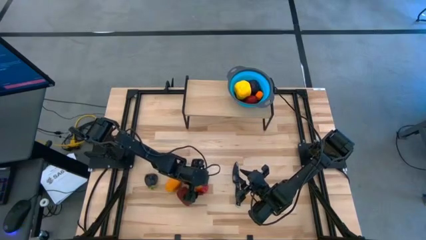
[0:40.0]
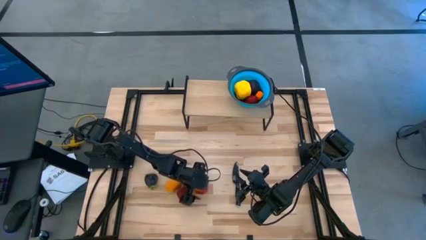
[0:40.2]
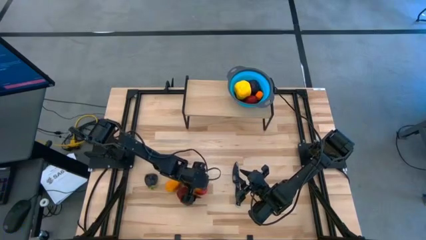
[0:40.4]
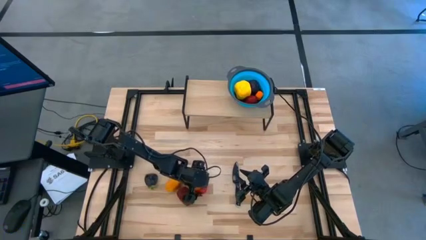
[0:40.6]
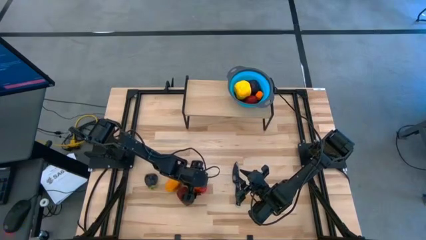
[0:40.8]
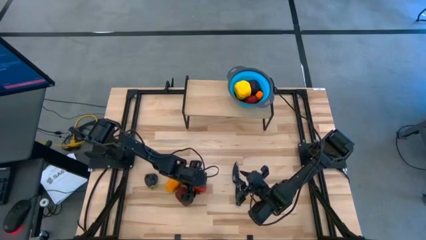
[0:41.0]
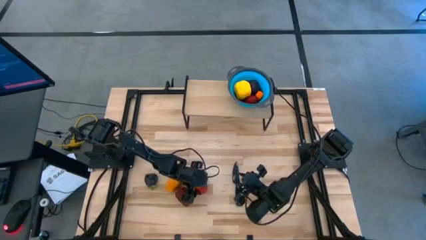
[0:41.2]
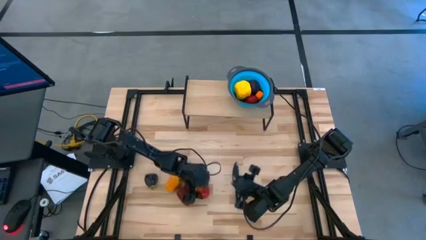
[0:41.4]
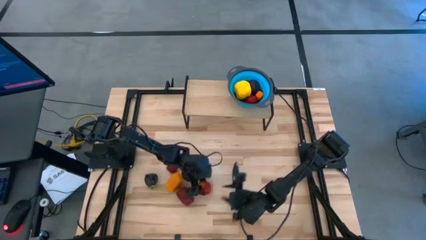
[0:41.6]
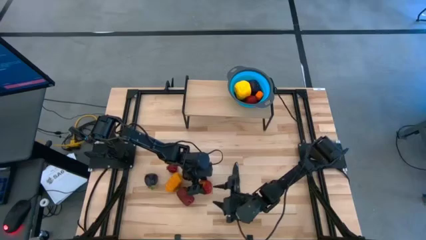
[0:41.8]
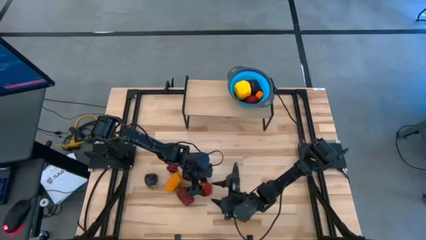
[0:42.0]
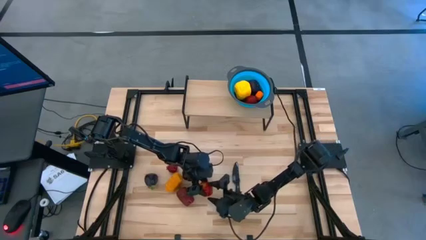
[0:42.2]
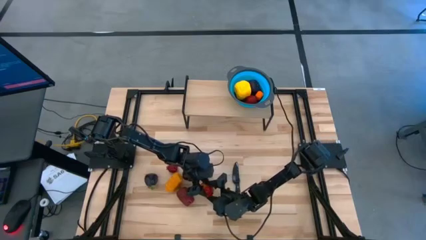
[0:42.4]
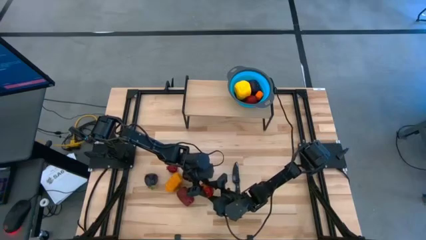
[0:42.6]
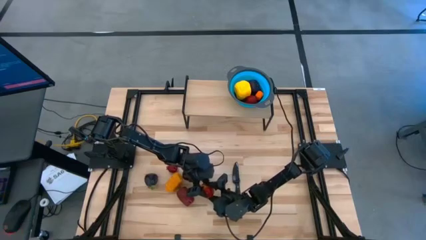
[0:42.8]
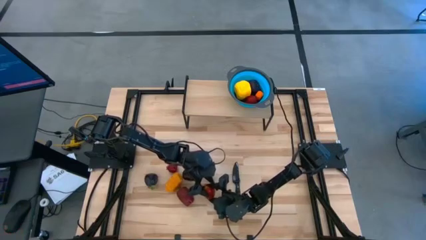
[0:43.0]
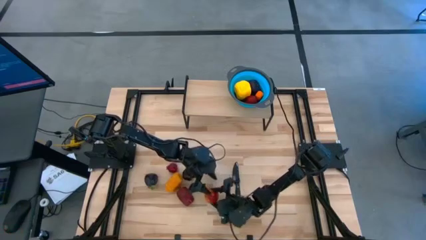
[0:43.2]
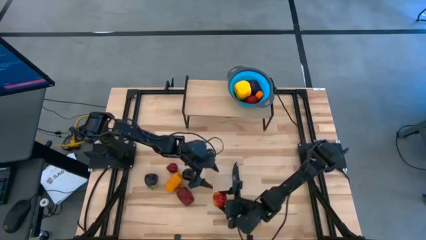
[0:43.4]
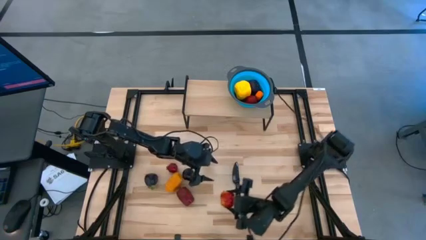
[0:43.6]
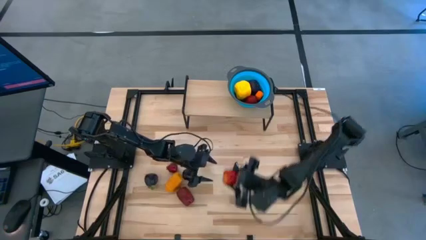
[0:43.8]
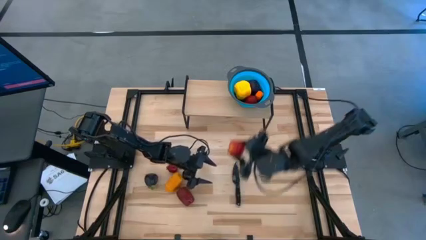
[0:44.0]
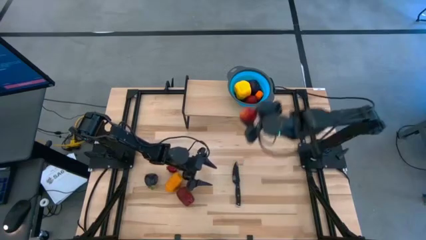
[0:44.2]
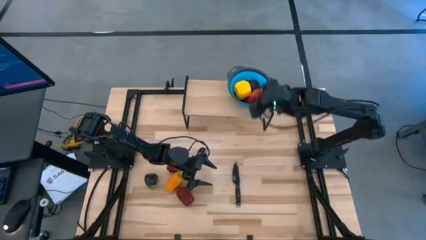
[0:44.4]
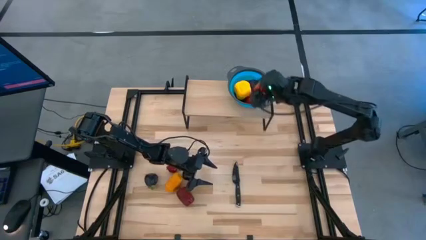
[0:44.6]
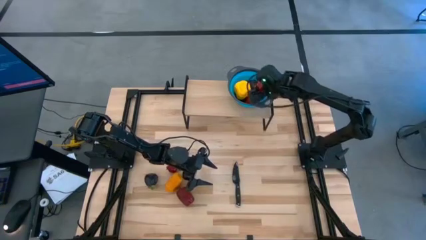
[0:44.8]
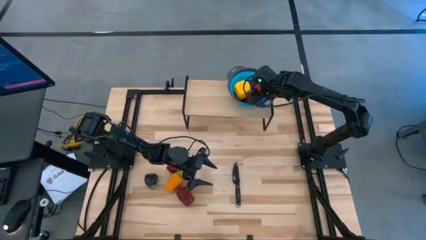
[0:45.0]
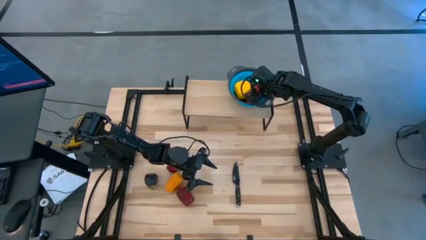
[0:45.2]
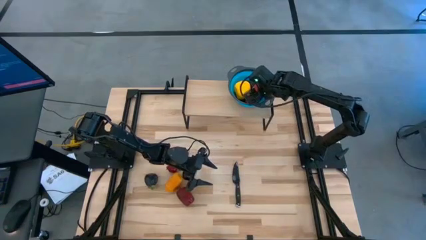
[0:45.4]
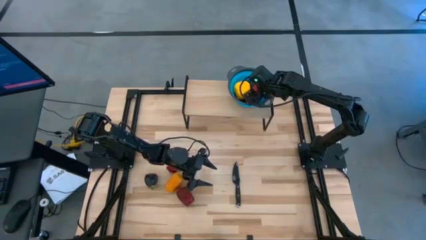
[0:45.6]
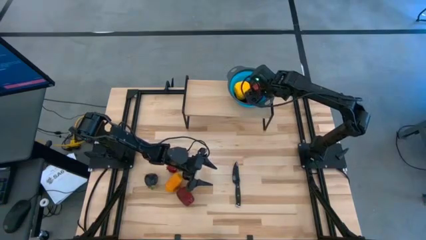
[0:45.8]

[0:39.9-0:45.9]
Task: Pick & Place Fruit
Put the right red apple into the blue strainer bowl on the shelf

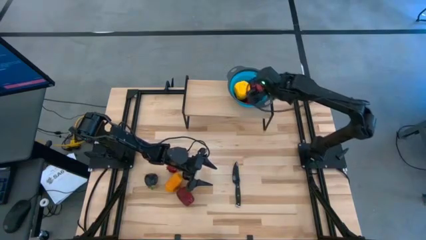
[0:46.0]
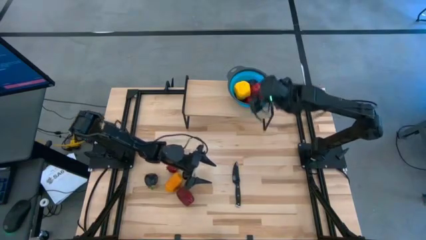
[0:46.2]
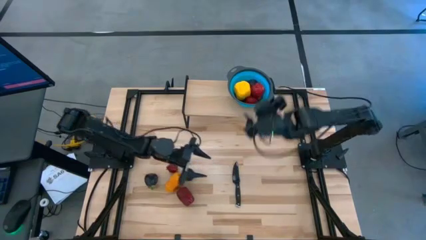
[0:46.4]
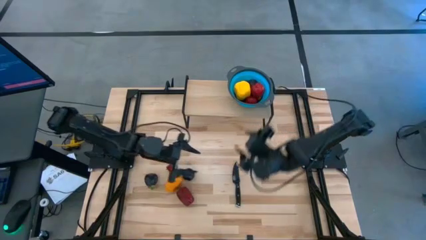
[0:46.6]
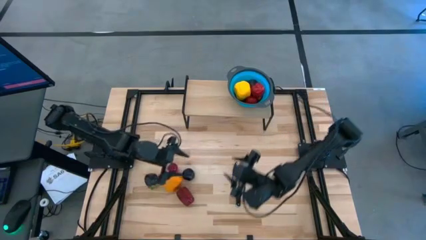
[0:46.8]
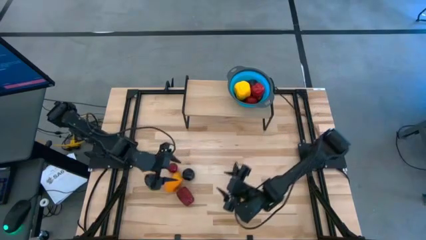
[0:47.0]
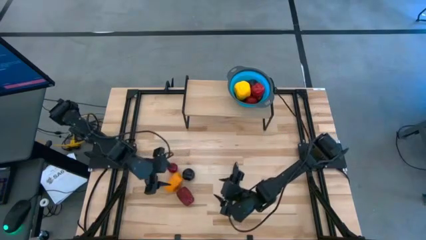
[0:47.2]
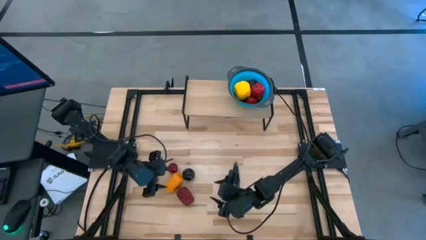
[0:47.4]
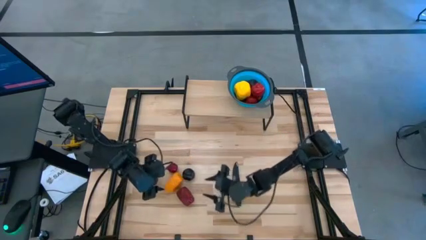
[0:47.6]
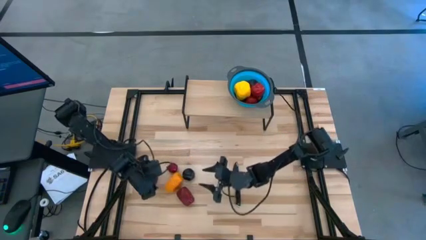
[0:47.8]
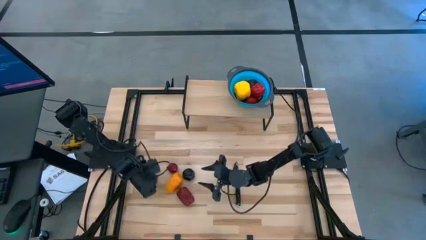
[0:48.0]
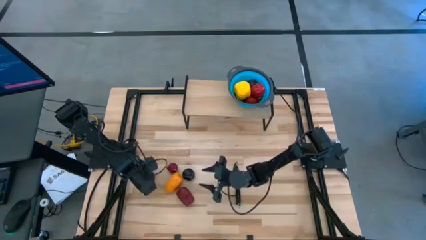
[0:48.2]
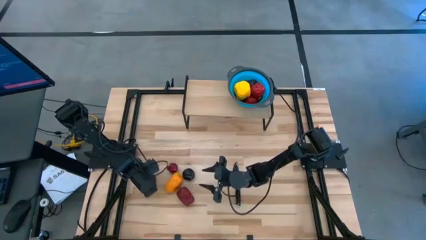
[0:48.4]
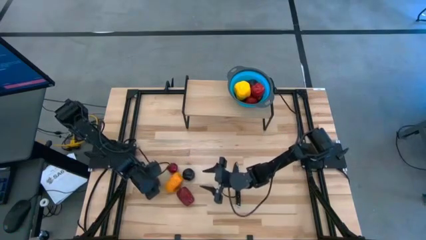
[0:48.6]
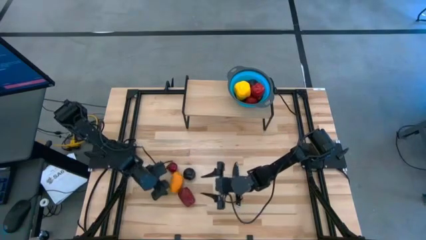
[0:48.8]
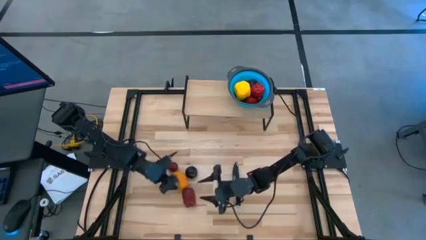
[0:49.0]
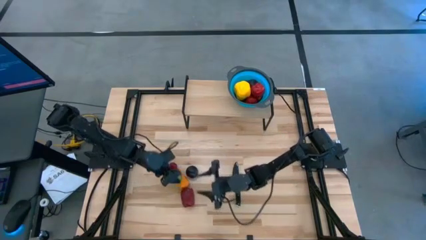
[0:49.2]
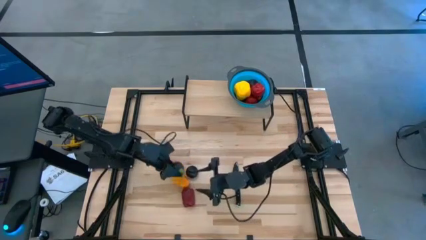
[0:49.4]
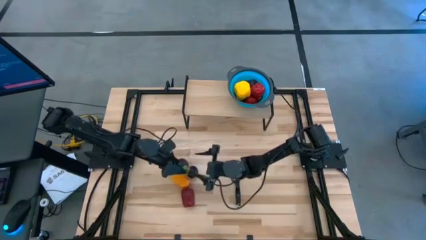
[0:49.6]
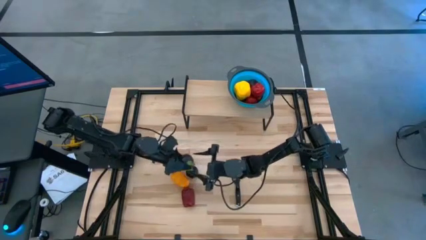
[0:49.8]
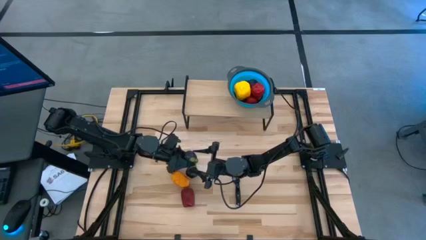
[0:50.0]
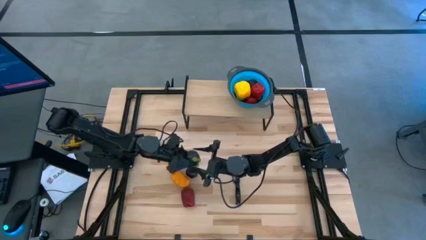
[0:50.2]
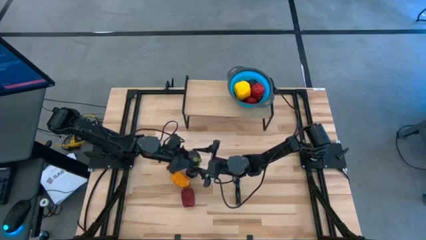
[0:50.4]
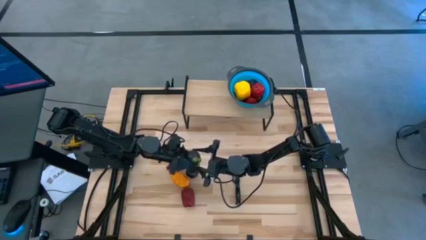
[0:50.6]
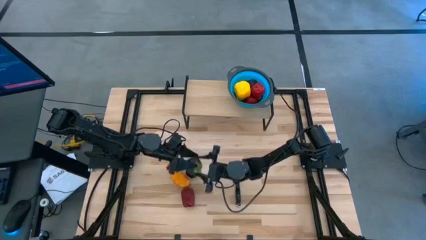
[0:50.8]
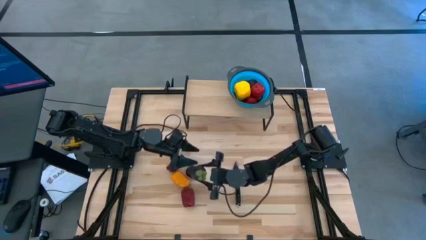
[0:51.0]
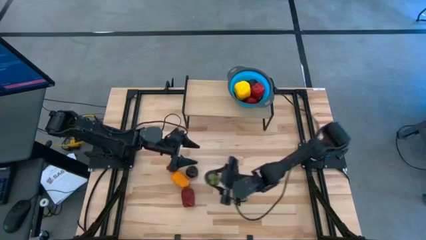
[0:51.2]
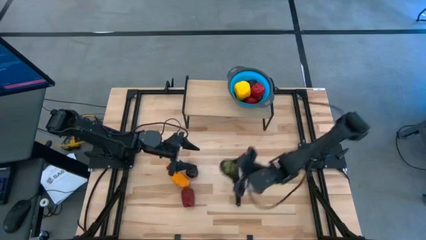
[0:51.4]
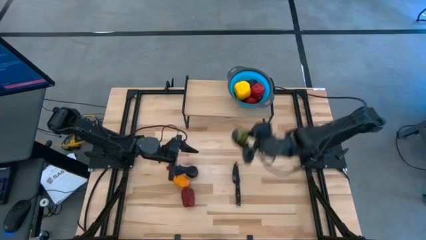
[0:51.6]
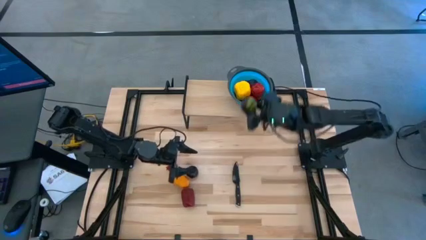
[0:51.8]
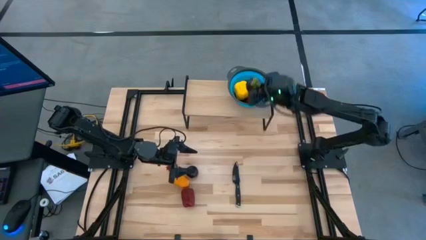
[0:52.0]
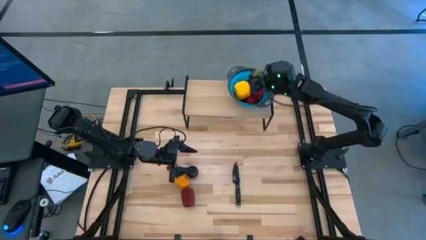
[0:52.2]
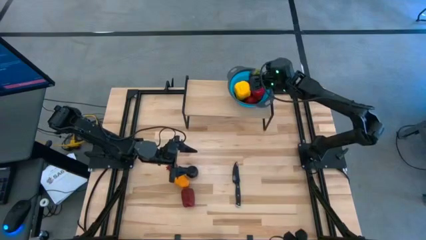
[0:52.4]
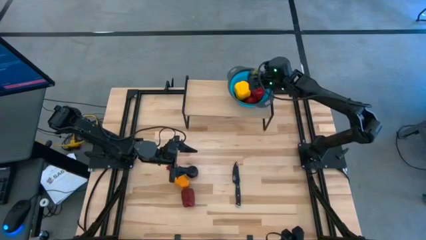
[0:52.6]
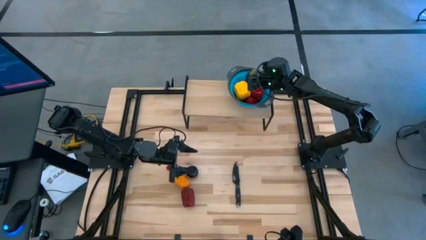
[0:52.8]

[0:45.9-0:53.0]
Put the purple mangosteen into the blue strainer bowl on the shelf

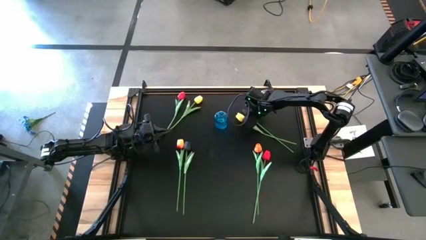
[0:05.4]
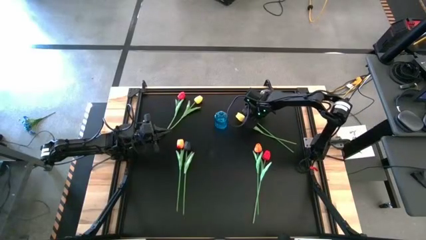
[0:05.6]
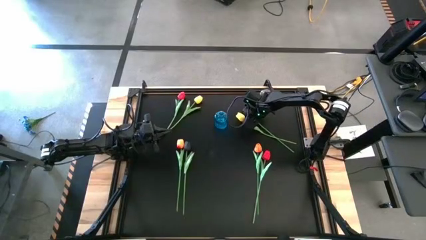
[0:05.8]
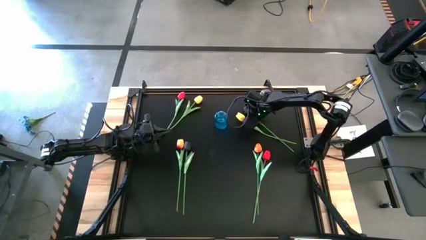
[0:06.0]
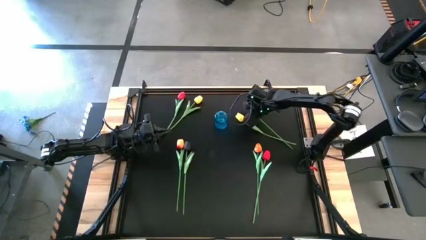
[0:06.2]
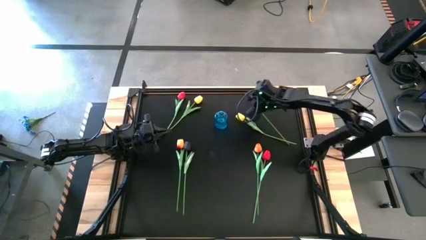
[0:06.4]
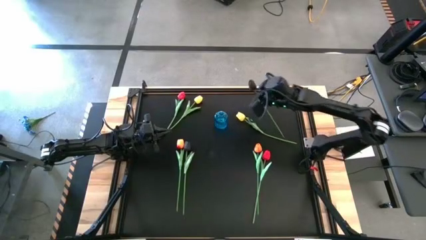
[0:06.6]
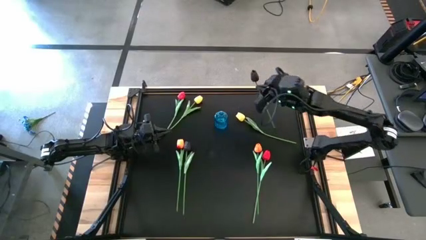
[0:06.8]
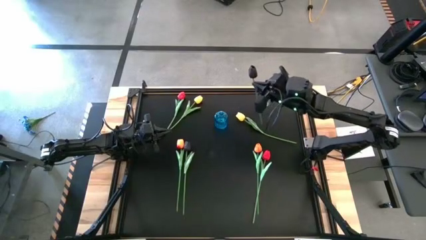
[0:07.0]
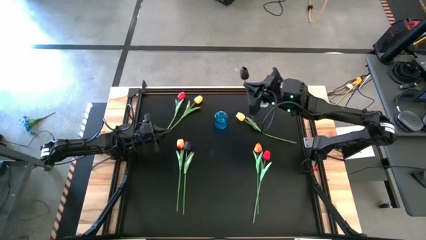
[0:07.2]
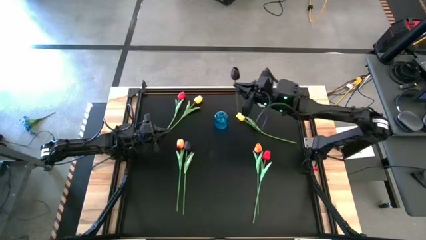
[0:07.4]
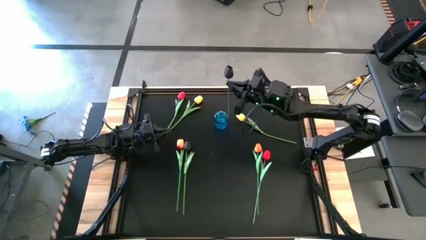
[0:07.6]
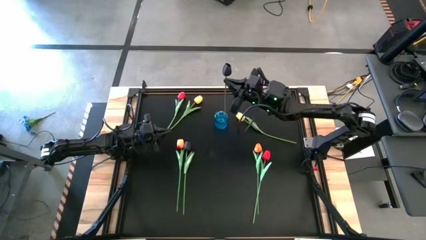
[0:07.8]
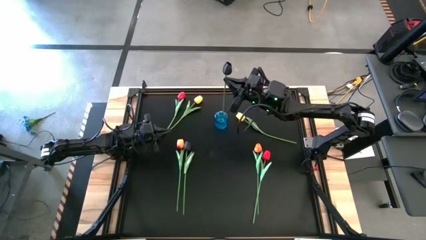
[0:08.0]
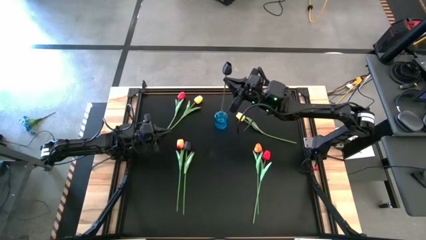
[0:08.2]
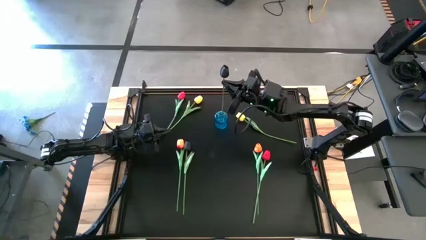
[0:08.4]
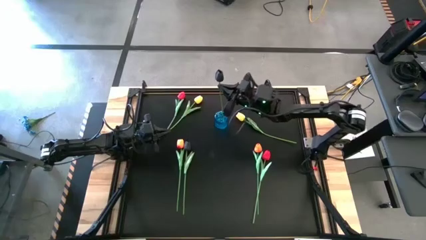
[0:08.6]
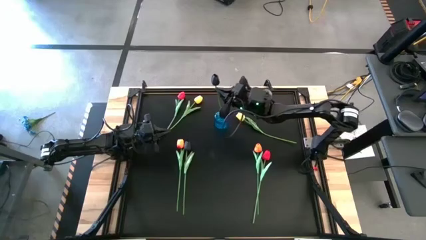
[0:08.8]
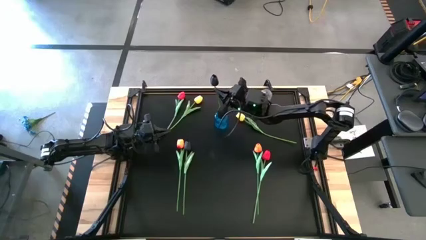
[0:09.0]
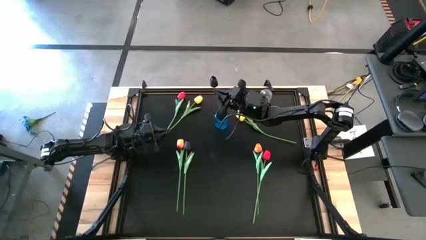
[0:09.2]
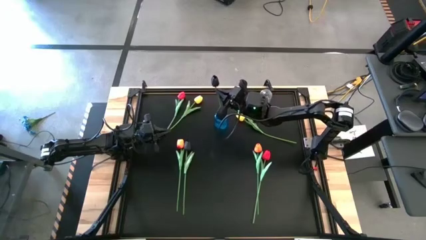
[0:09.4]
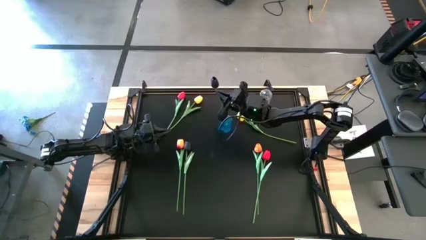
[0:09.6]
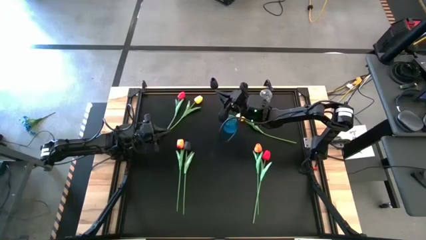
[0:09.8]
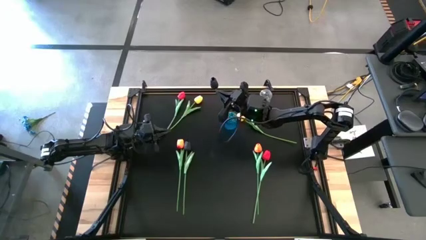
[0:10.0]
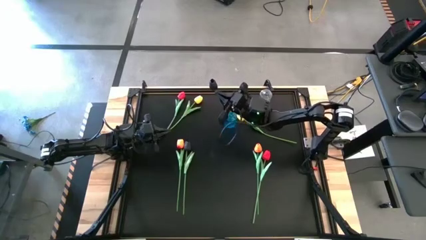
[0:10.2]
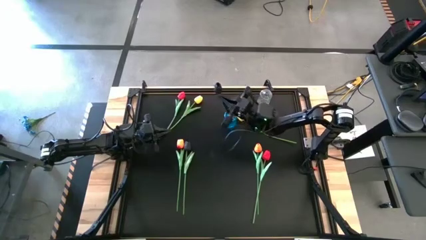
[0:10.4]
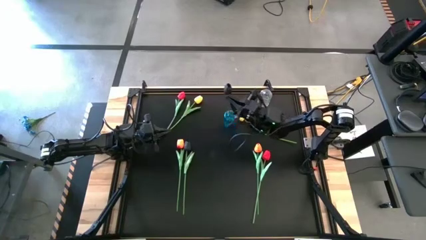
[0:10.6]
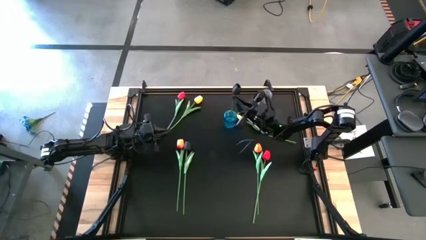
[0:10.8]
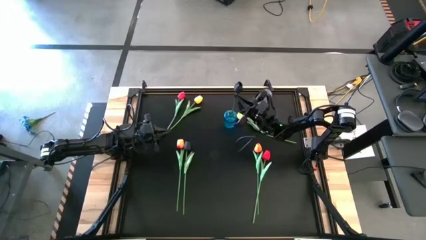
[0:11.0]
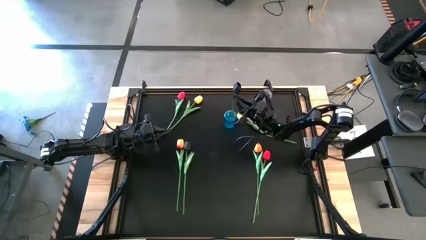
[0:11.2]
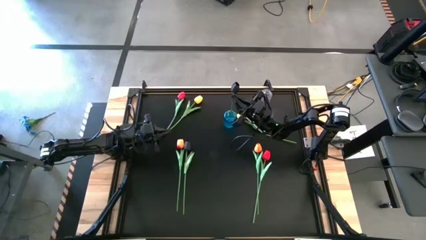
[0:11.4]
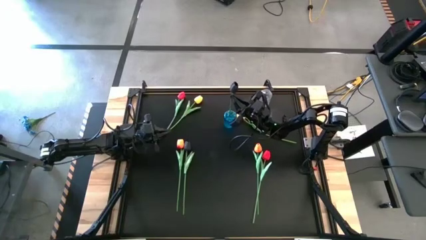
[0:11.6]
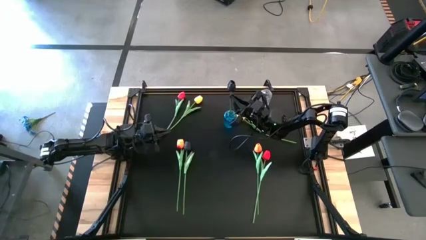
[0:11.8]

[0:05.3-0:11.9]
Task: Sort flowers into vase by color
Put the top black flower into the transparent blue vase
